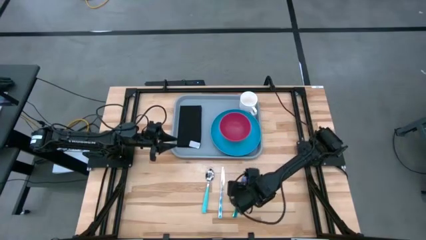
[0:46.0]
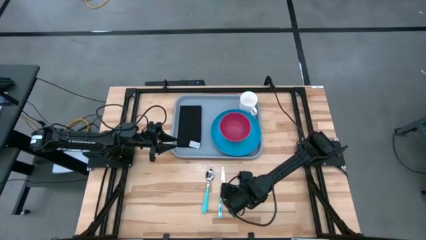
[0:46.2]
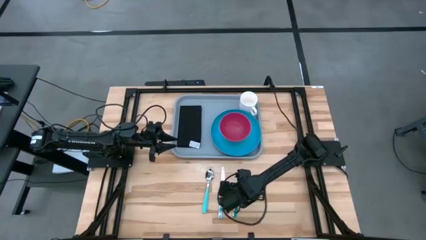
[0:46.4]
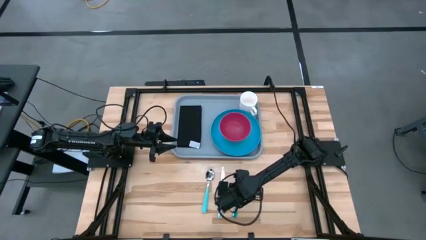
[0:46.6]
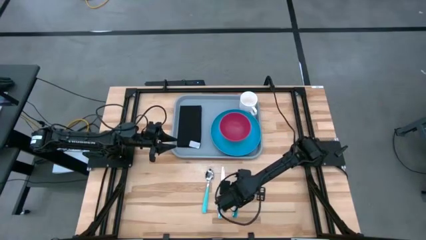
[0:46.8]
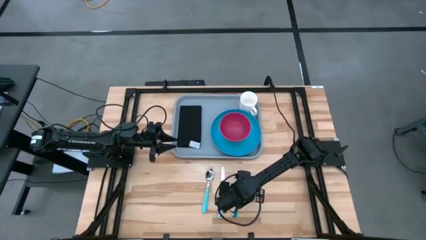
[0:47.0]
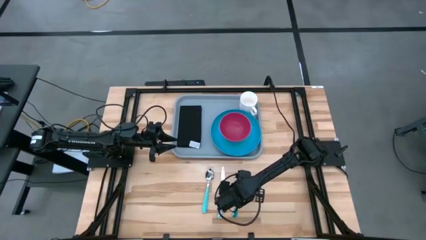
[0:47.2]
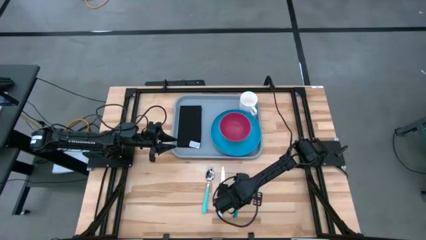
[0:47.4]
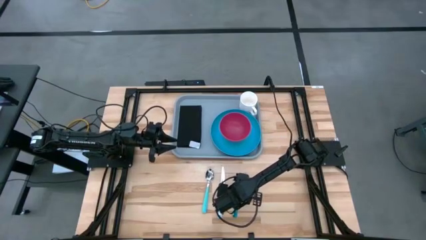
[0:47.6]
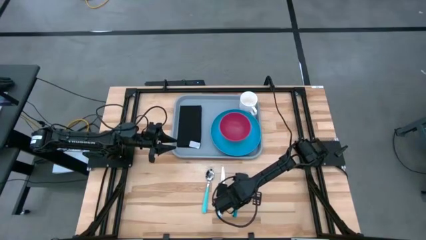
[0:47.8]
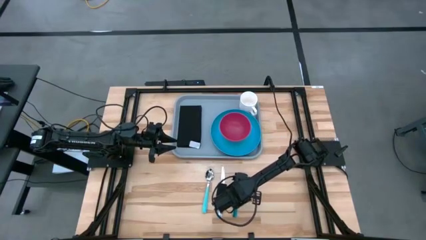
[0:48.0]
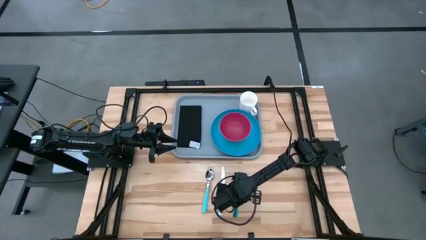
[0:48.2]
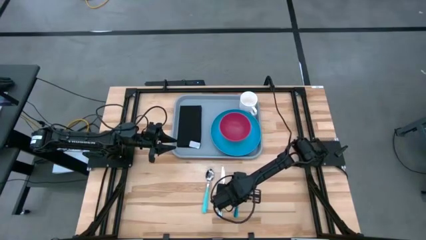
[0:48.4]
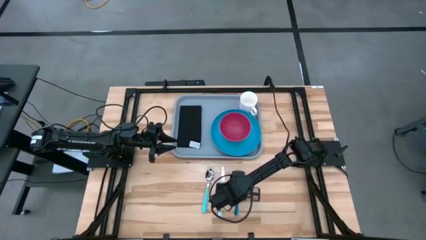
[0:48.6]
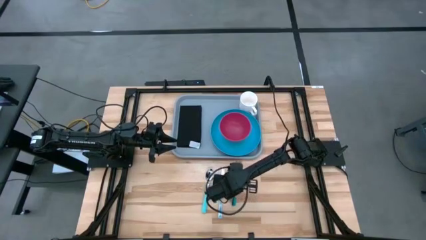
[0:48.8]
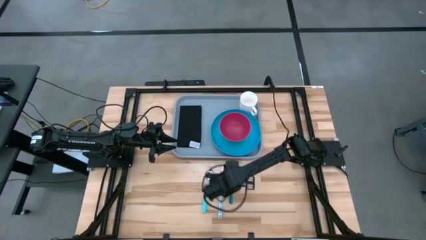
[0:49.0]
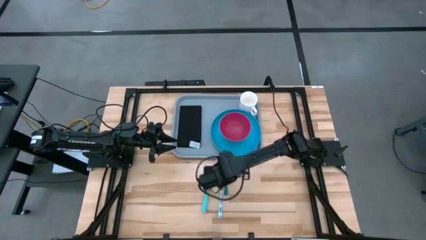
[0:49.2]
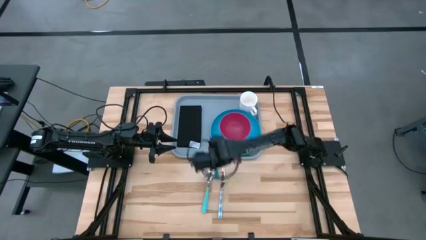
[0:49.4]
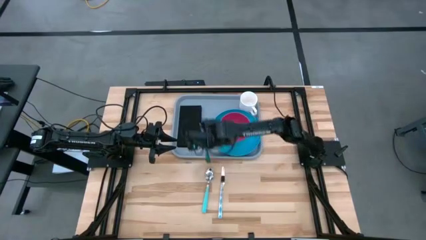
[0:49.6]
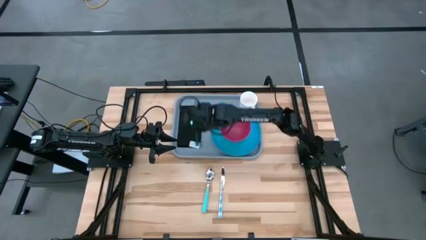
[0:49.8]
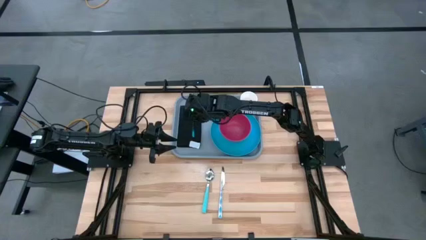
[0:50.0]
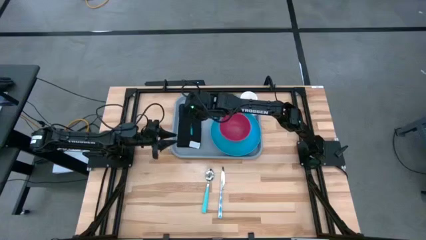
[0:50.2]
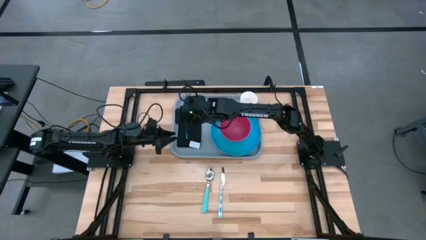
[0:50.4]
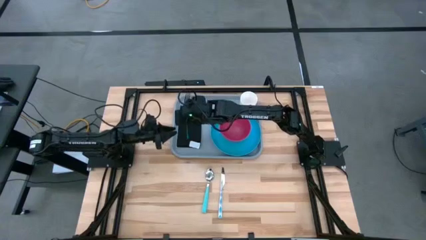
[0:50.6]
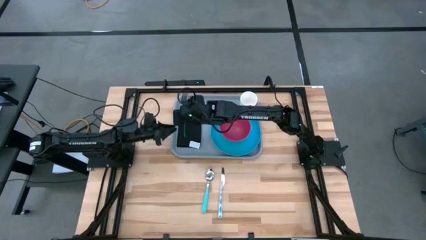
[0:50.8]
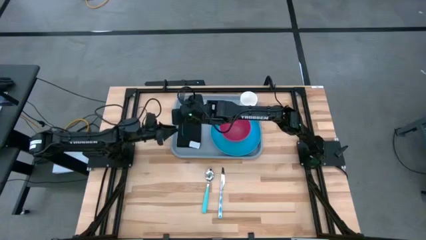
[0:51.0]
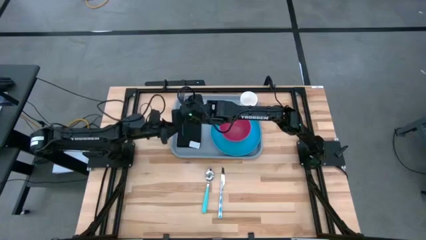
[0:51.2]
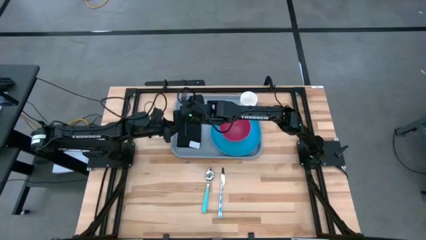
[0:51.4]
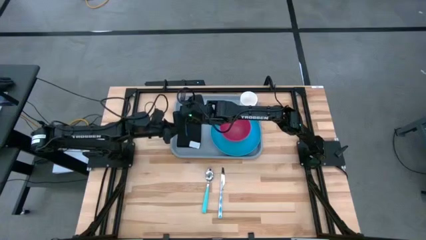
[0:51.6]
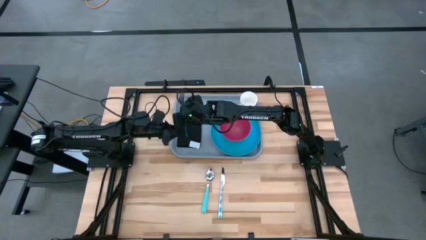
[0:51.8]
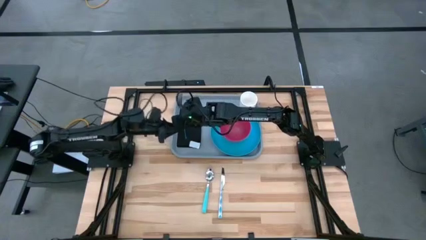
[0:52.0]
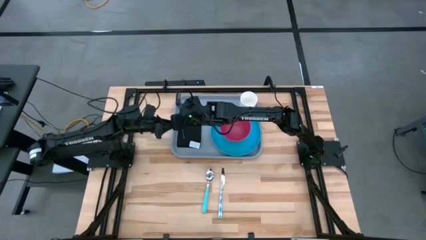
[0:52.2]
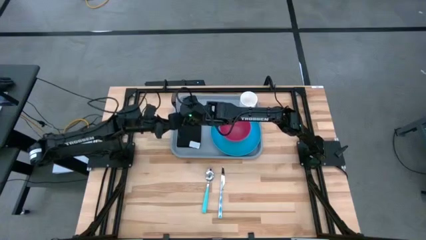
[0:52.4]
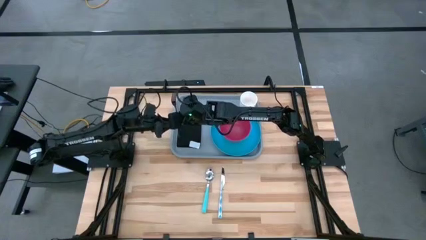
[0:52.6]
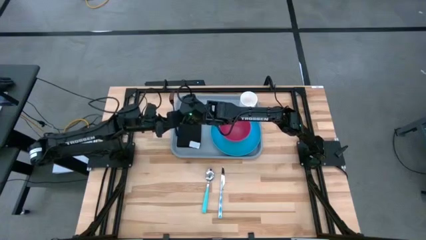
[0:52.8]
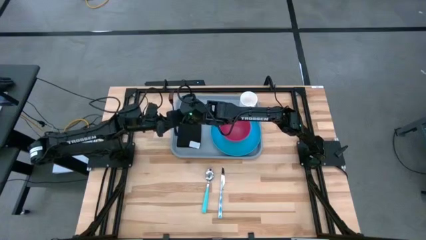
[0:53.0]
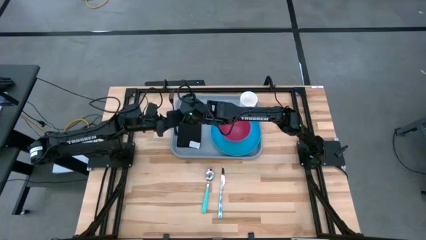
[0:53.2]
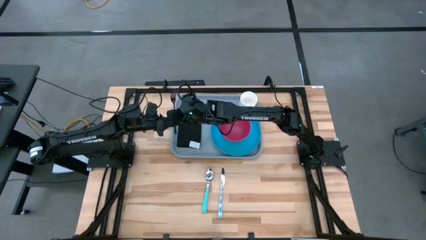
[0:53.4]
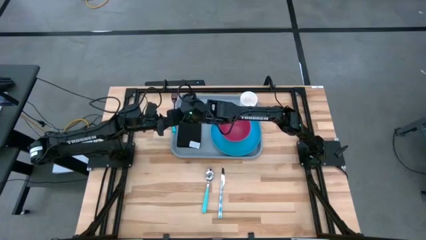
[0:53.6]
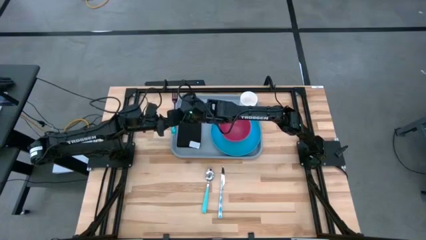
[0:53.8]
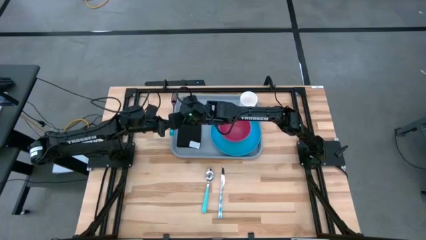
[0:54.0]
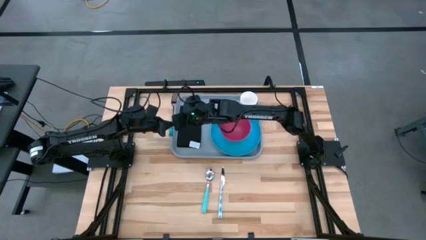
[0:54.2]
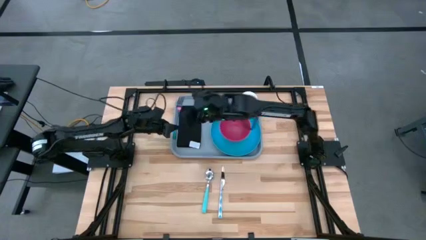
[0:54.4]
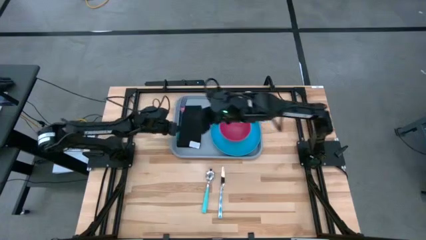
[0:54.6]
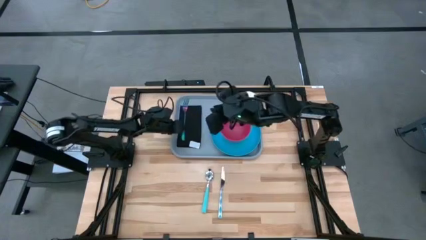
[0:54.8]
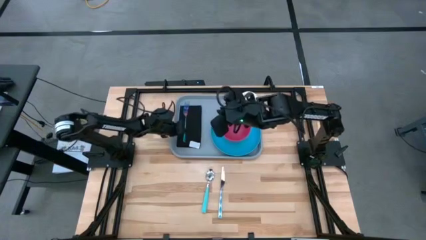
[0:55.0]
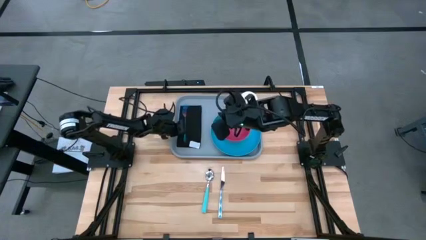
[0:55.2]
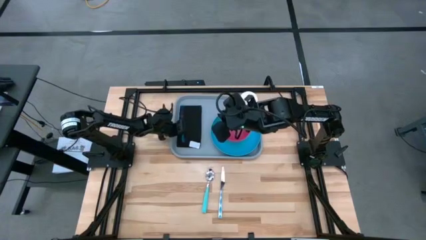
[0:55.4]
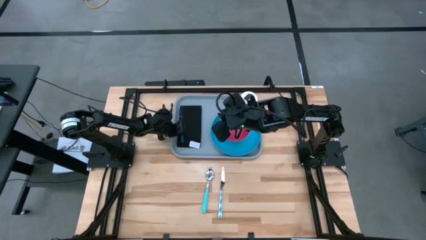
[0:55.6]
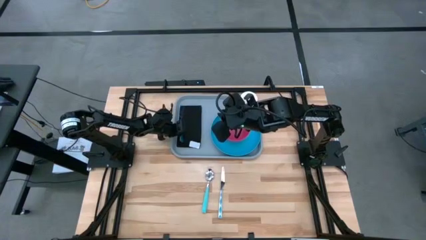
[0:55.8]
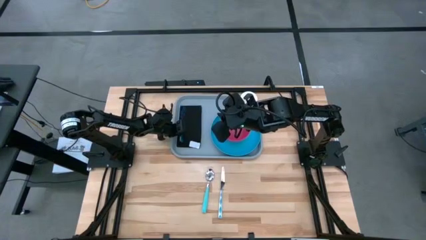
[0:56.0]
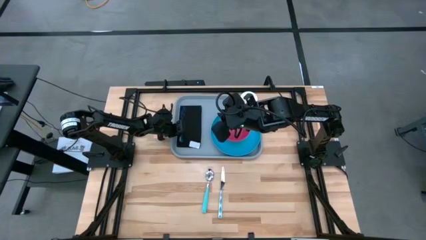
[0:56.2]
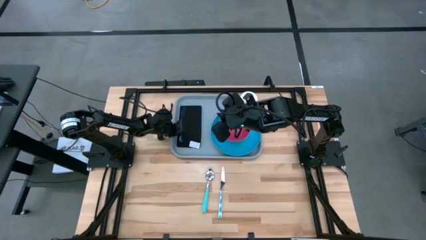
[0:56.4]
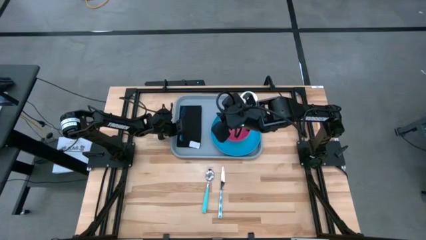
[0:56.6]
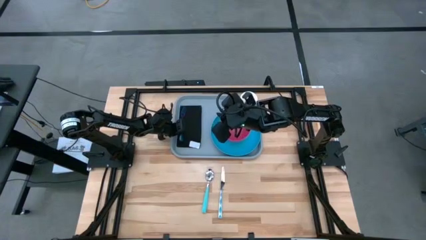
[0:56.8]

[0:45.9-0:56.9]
Task: Set up tray
Put the blue fork on top of the black napkin

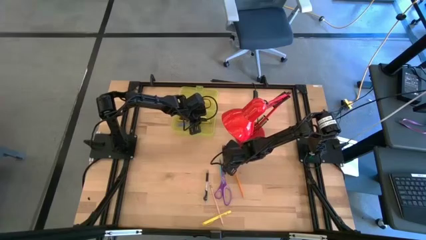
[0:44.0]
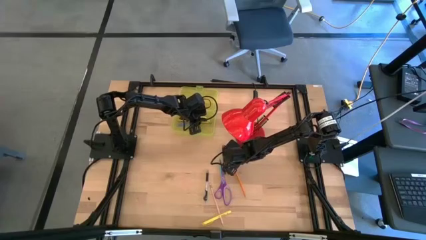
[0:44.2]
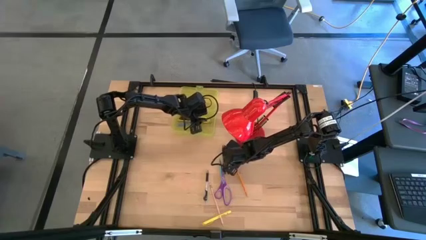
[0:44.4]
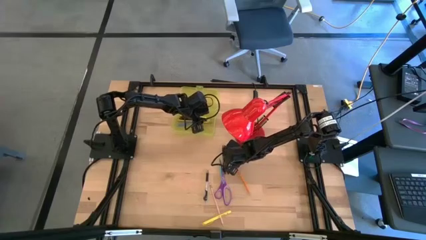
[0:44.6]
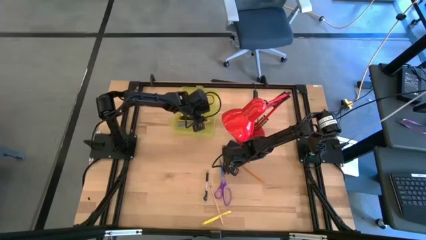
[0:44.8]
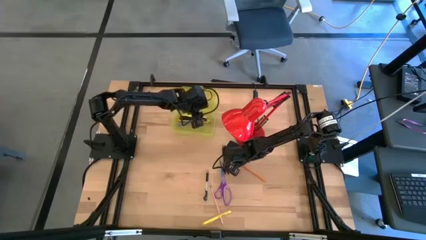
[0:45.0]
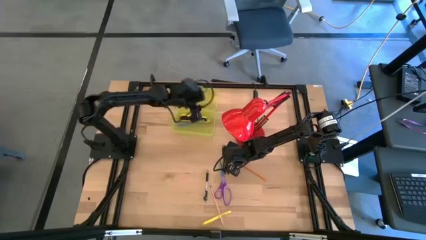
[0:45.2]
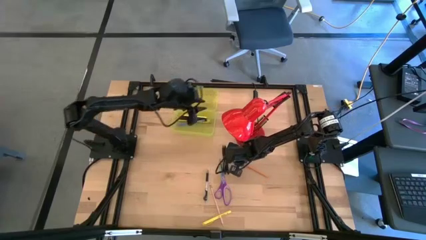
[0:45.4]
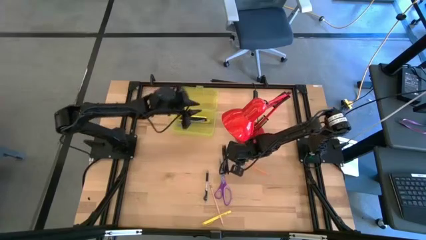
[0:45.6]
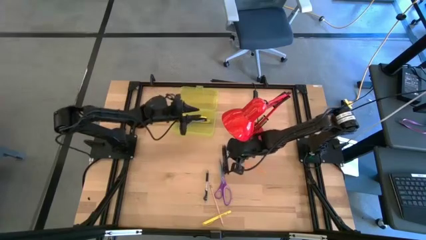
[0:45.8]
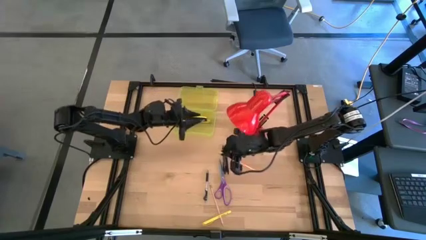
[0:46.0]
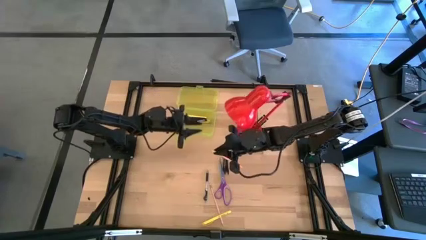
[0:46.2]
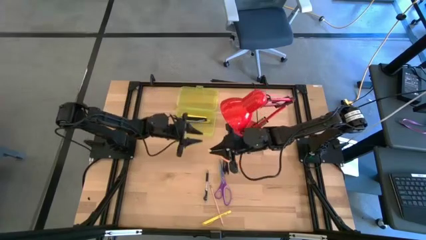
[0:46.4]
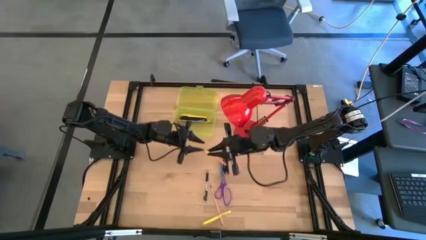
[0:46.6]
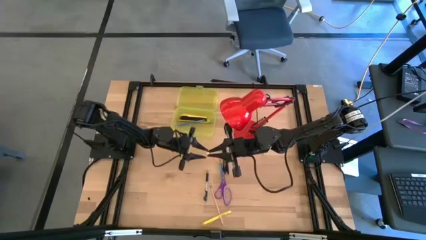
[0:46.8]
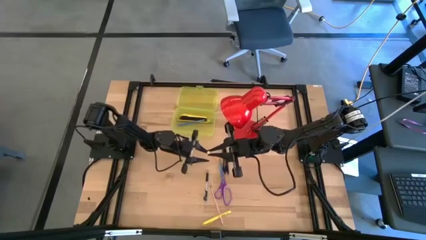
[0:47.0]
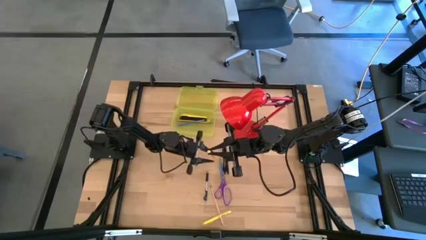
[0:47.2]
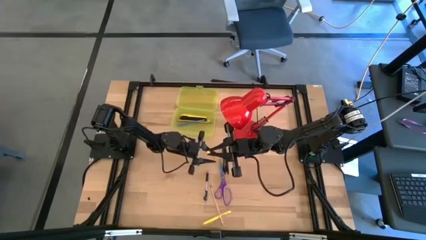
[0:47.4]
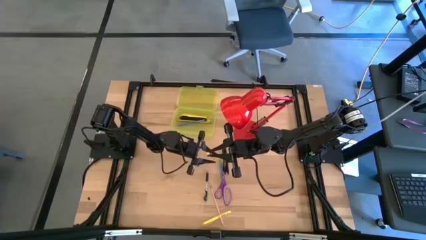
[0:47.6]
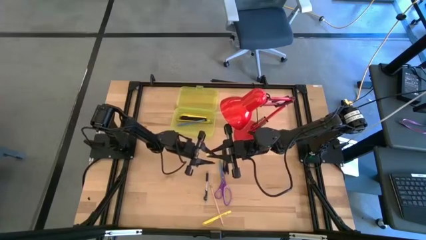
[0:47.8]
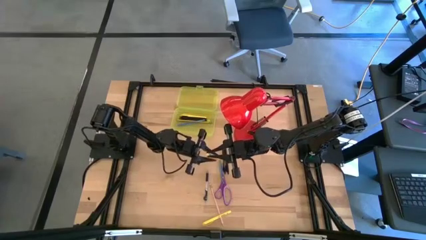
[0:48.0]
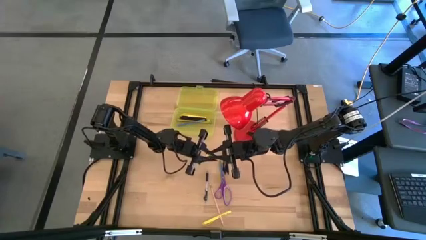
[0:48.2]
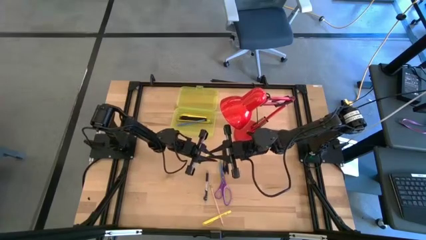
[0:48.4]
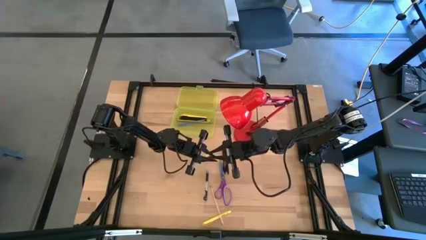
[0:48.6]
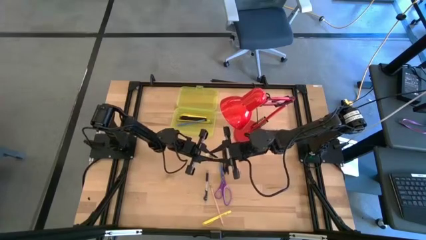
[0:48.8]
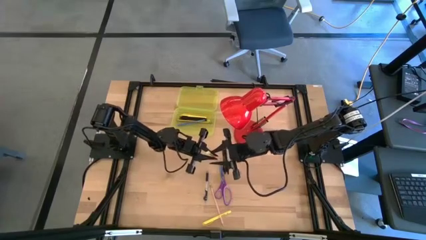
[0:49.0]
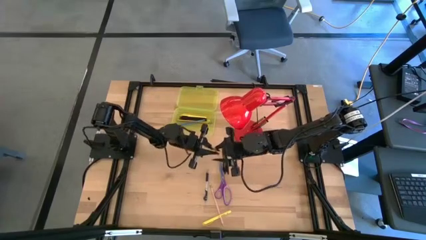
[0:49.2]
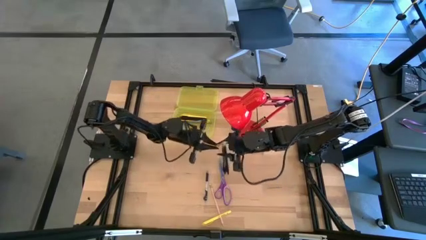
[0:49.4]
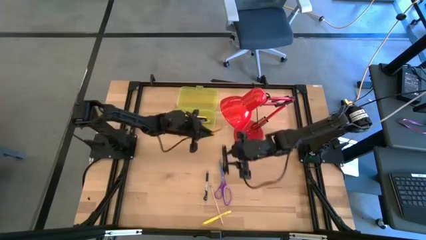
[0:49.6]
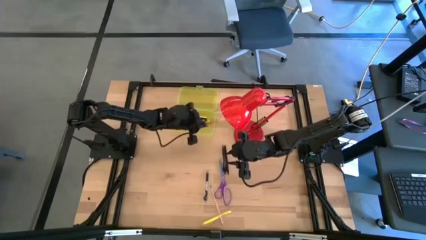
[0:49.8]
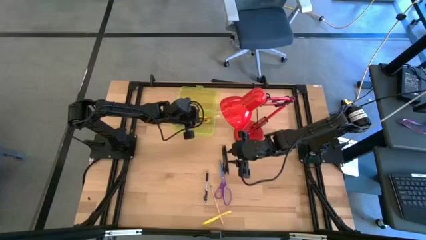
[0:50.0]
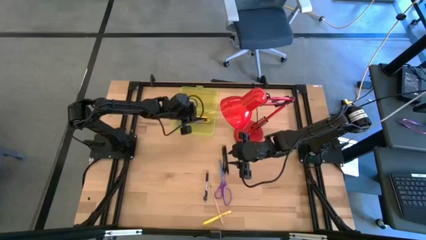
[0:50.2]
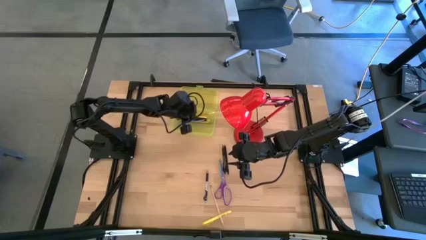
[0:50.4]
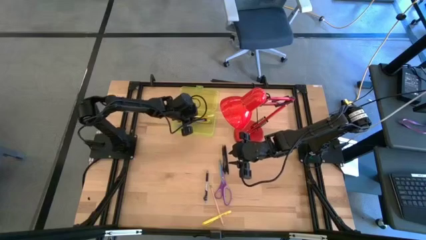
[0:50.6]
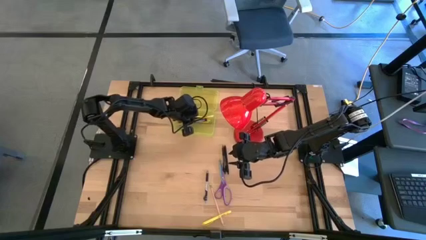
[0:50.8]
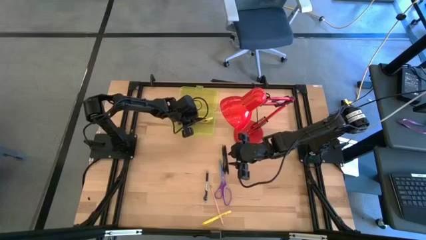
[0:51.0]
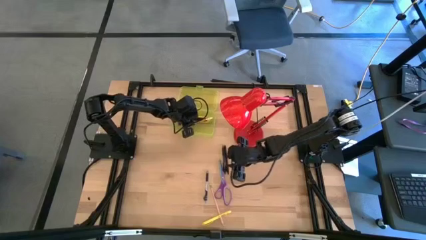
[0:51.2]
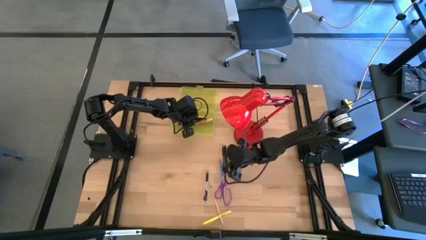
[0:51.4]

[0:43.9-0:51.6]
Task: Pick & place school supplies into a supply box
Put the orange pencil into the yellow supply box
